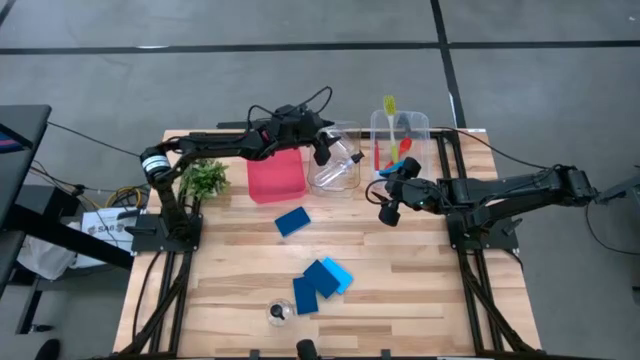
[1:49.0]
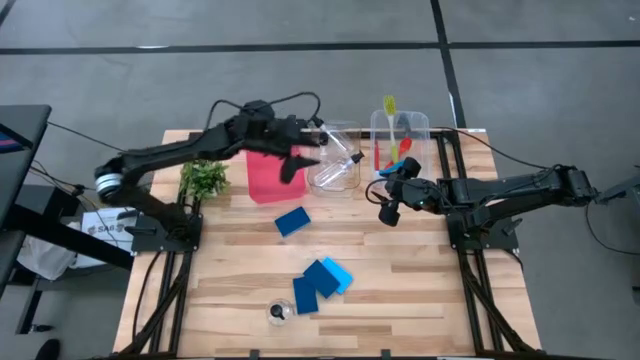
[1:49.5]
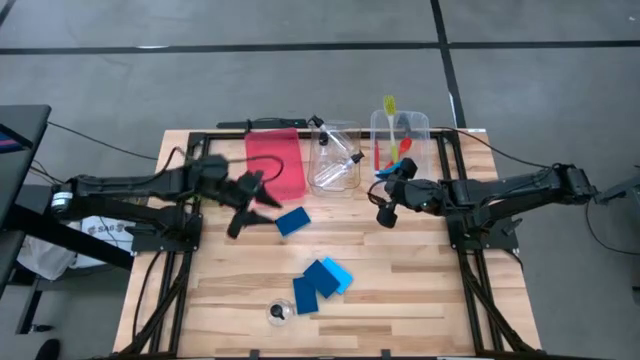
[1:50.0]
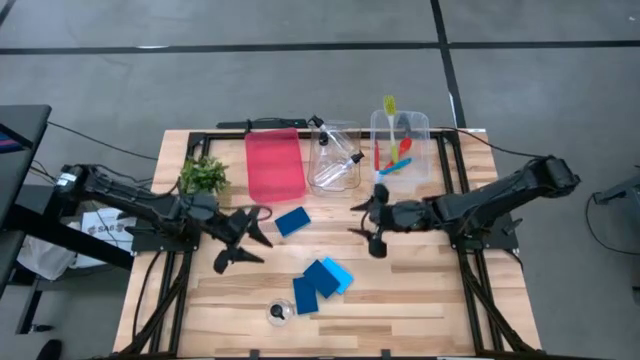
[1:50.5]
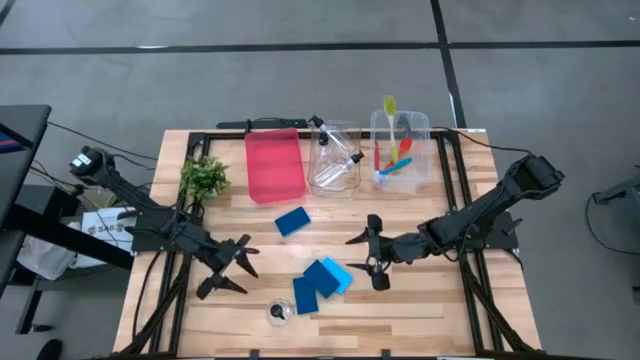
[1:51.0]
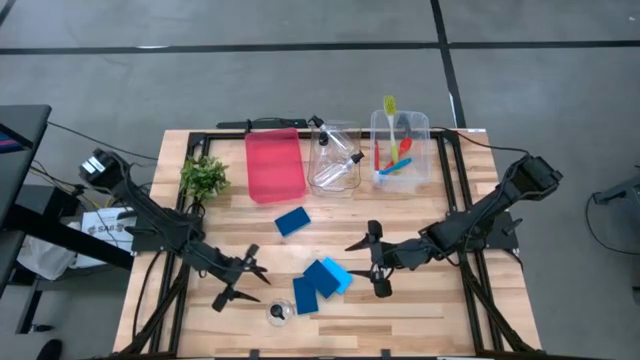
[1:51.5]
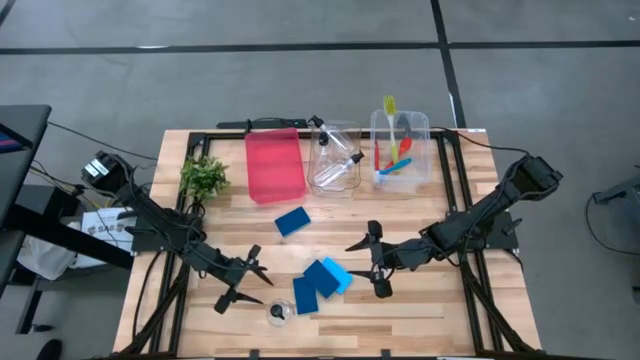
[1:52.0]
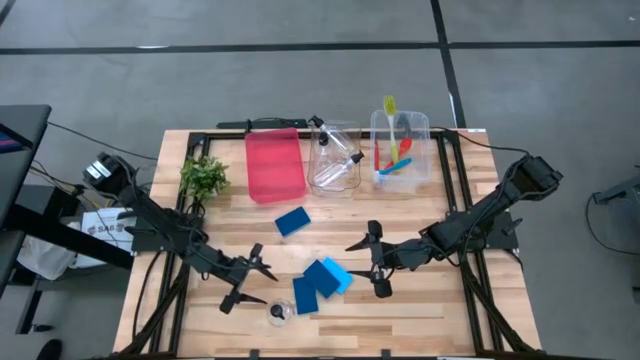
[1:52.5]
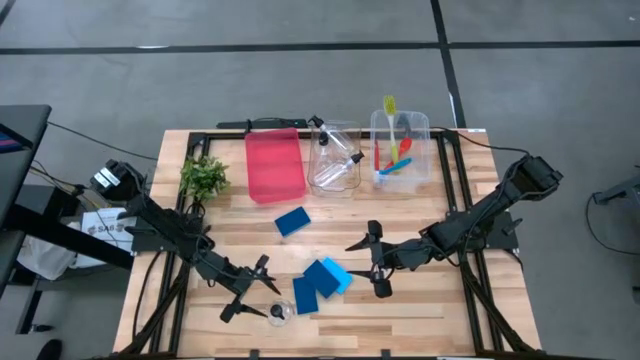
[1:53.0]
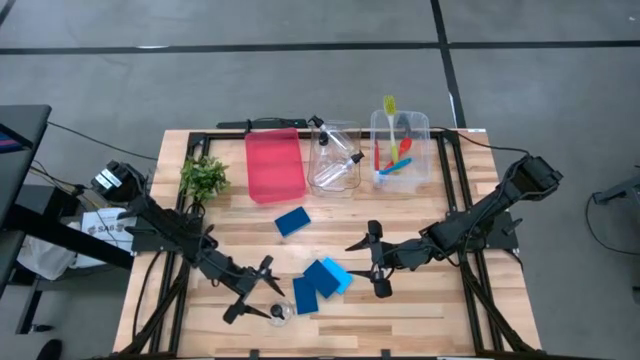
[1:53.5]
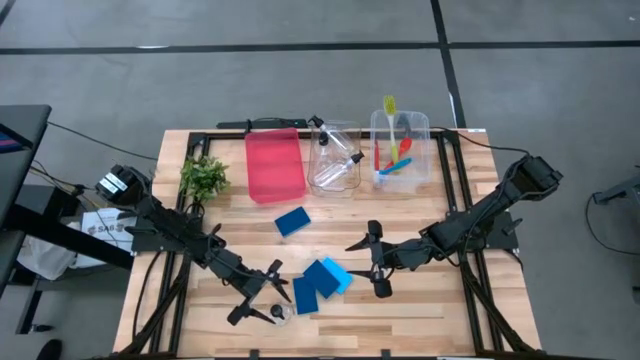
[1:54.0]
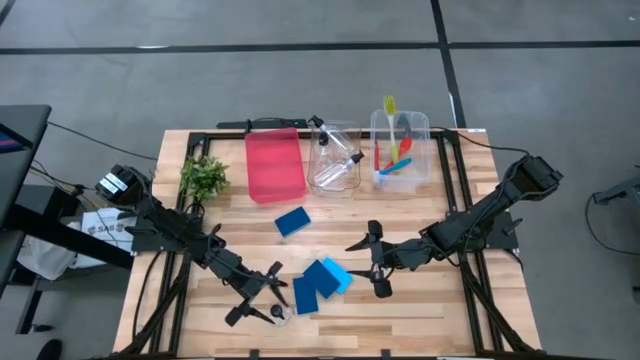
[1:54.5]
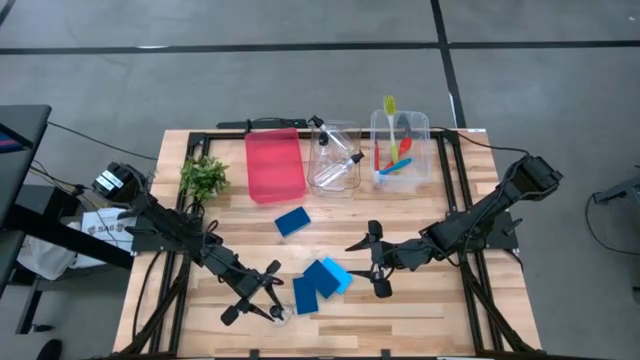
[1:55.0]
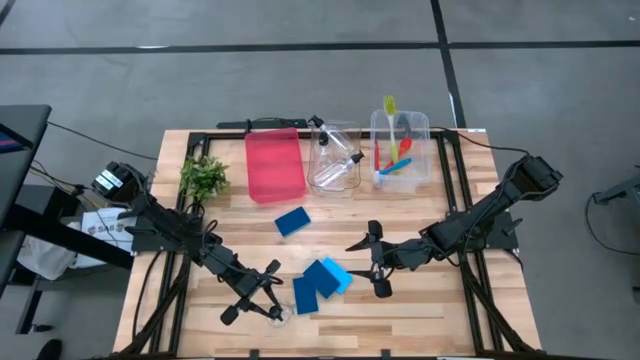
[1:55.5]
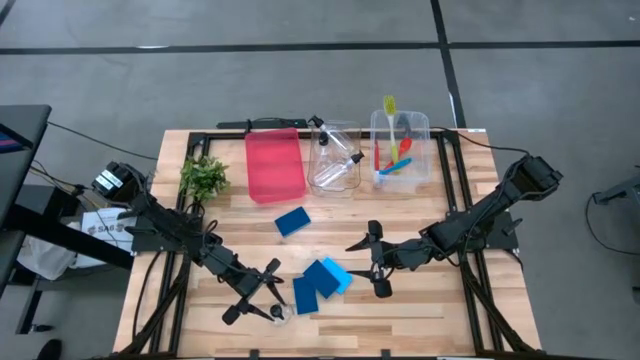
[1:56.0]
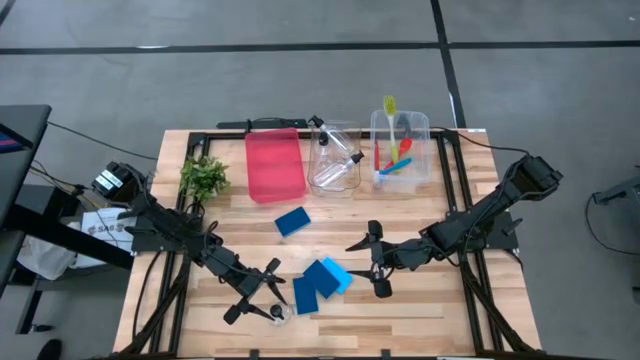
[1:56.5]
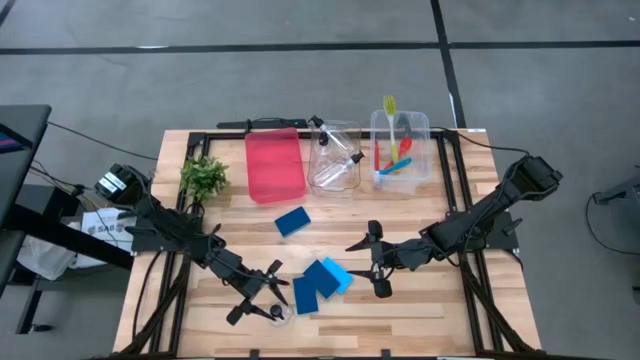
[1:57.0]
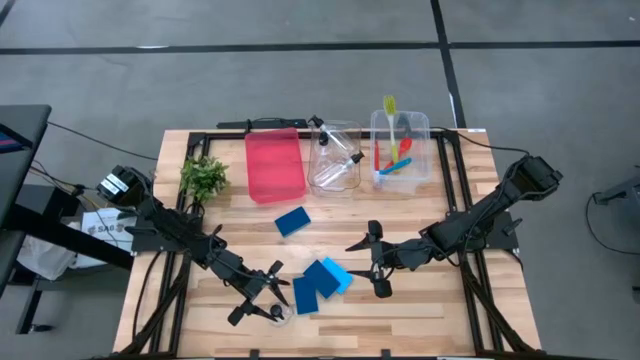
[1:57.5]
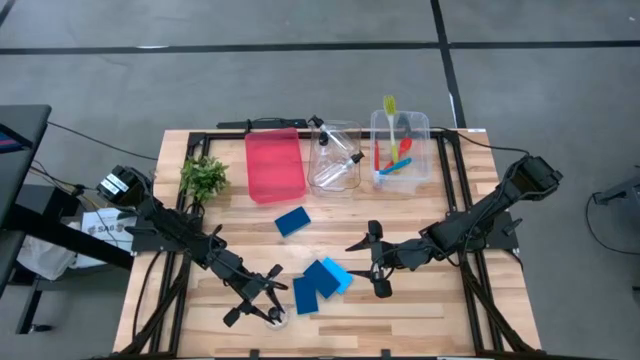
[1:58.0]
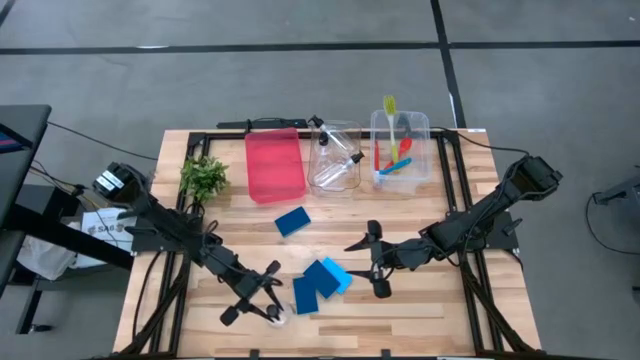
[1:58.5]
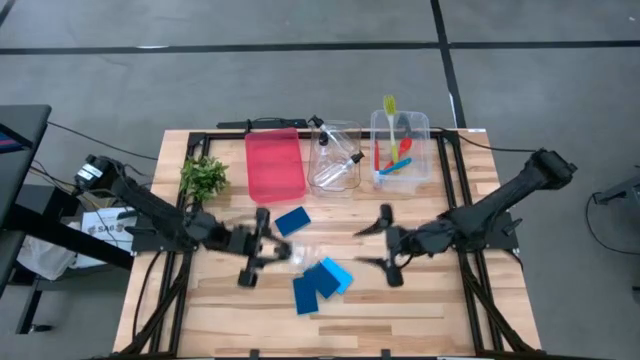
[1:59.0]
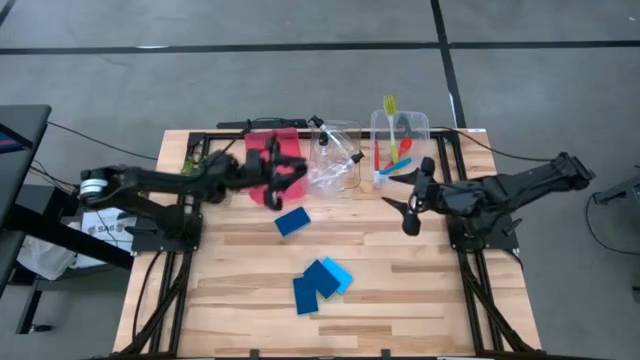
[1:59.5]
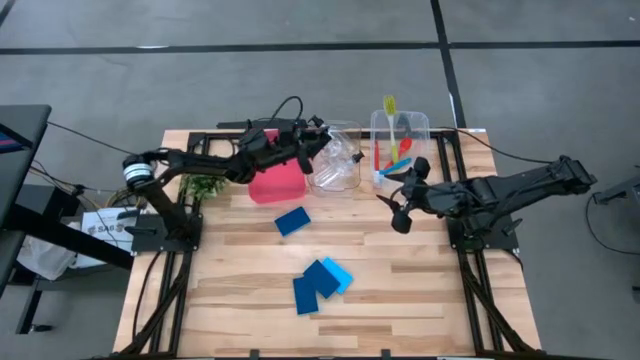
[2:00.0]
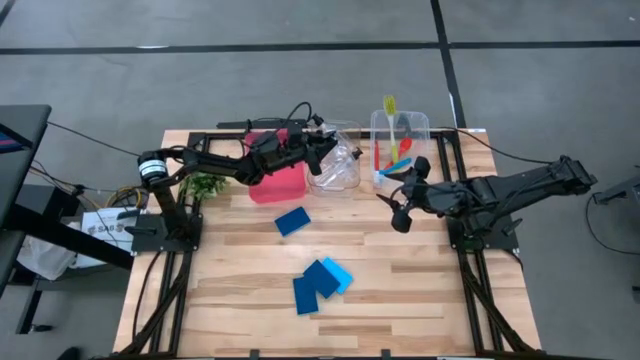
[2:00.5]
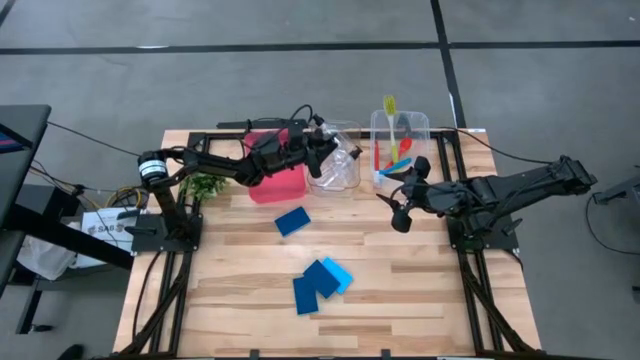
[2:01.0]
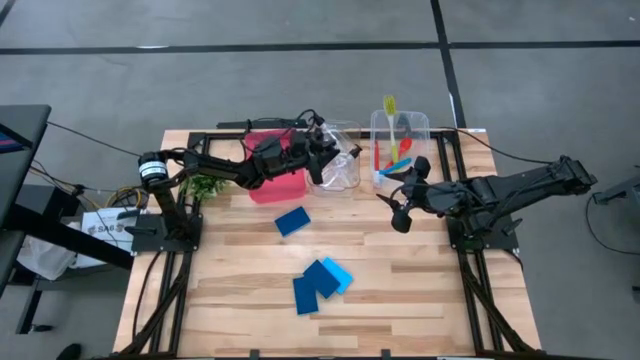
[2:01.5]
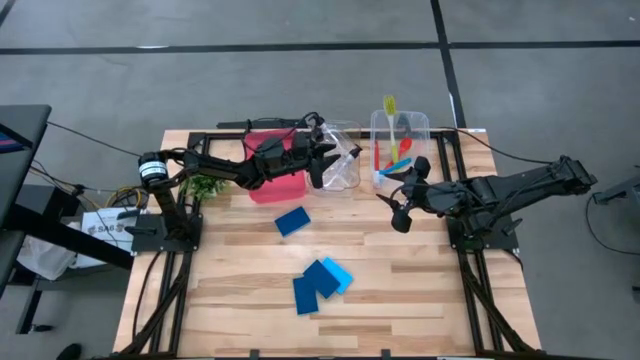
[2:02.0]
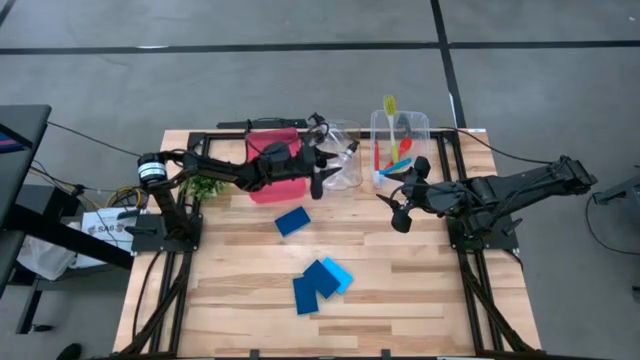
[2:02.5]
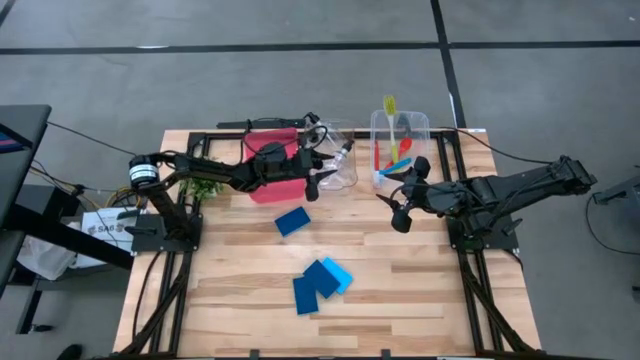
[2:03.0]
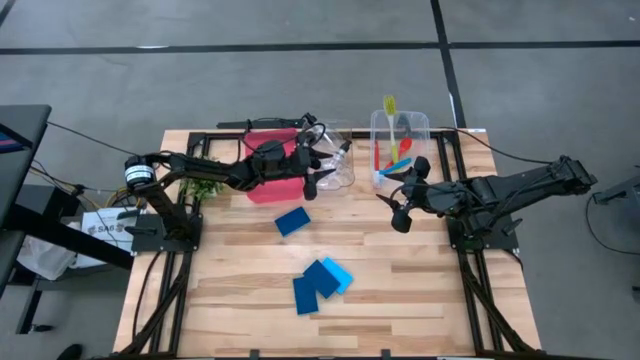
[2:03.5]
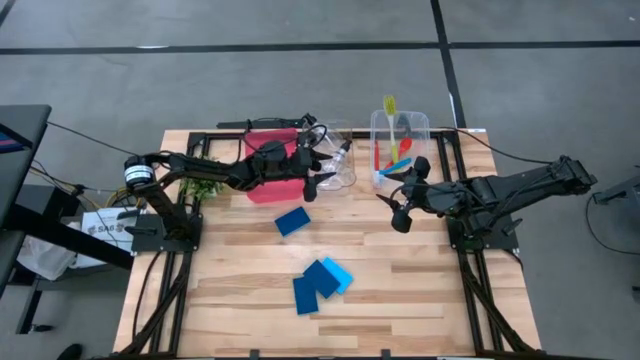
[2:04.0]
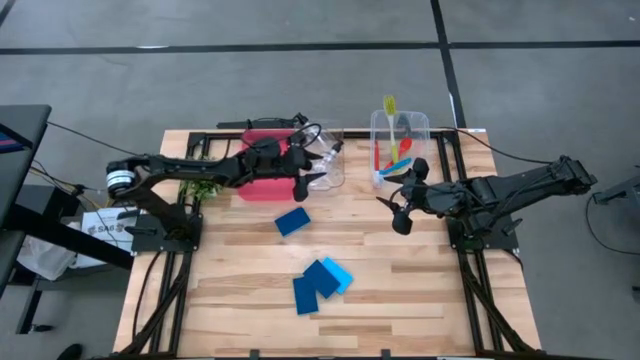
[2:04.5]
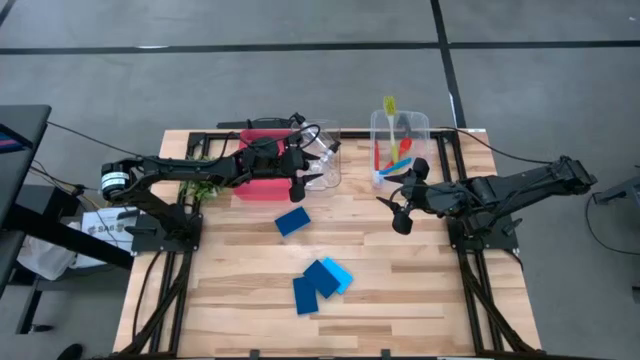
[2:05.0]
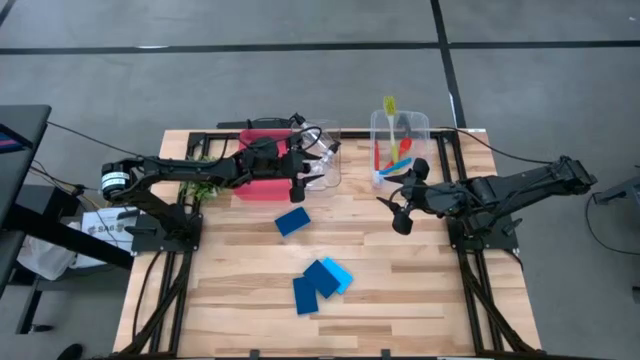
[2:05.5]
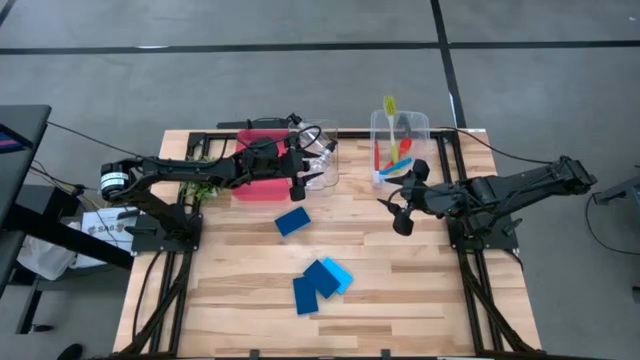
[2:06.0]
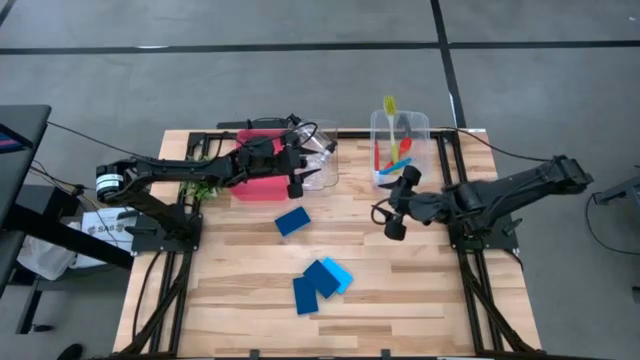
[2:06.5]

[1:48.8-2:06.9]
Task: Pick & Place Kitchen Sink Supplies
Put the soap dispenser into the left transparent bin

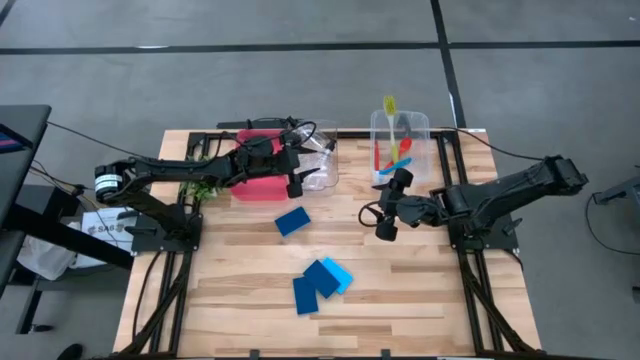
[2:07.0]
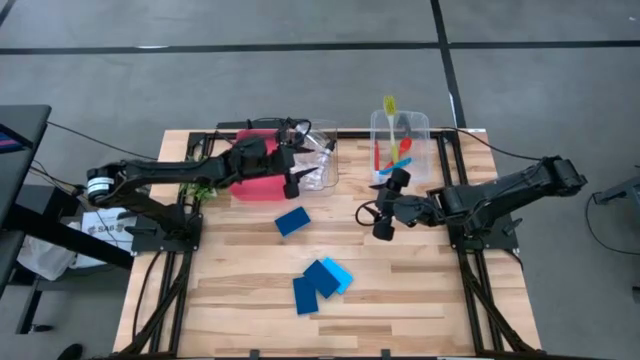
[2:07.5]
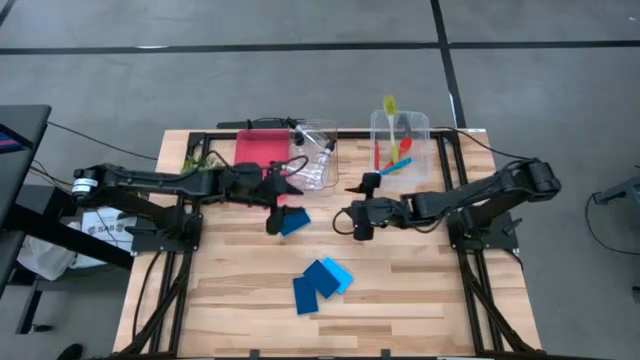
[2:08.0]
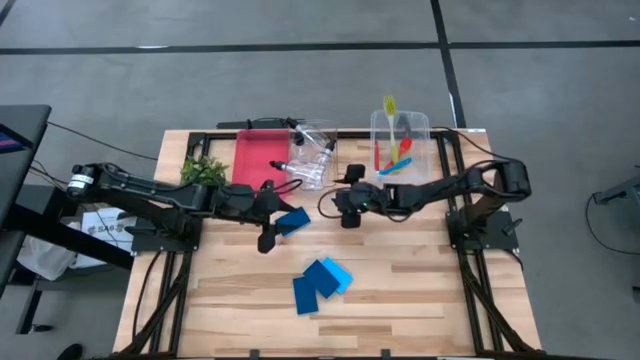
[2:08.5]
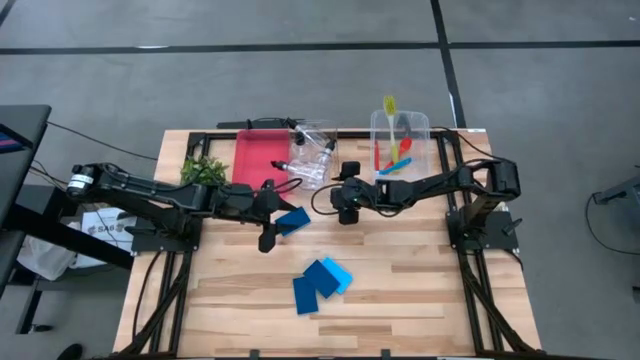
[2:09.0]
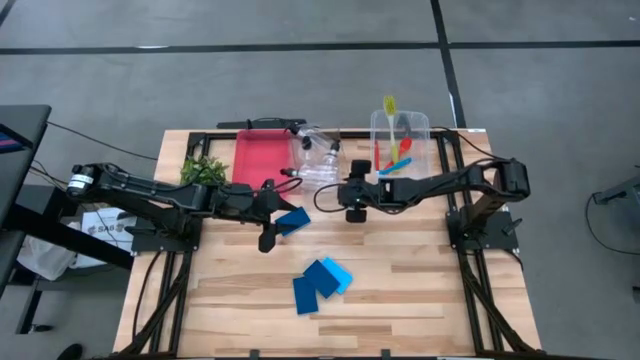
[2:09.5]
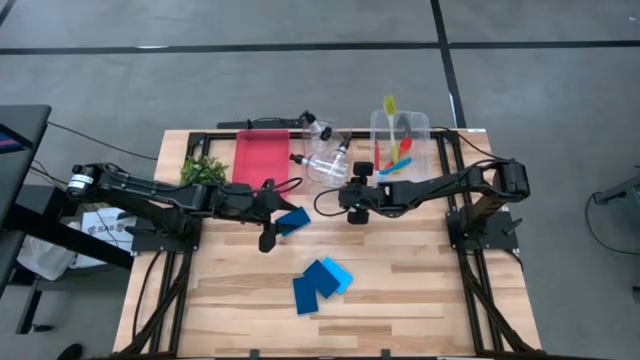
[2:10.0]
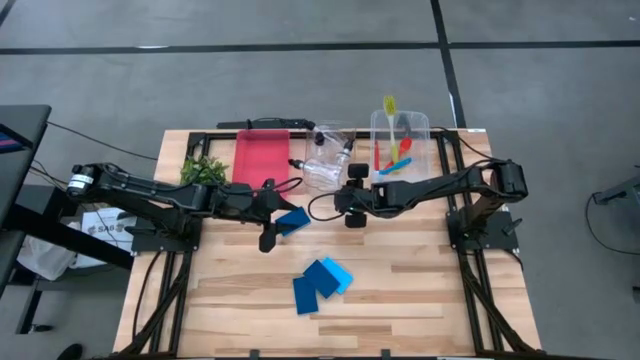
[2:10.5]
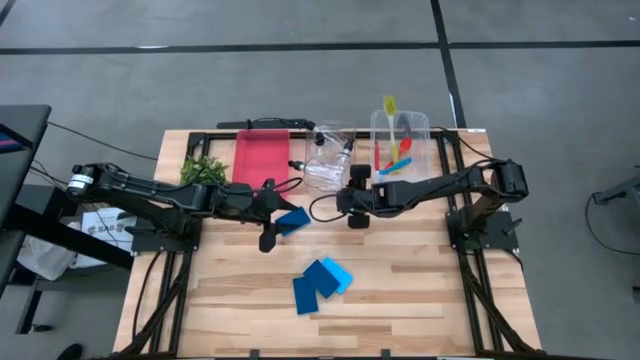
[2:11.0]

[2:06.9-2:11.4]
Put the soap dispenser into the left transparent bin
